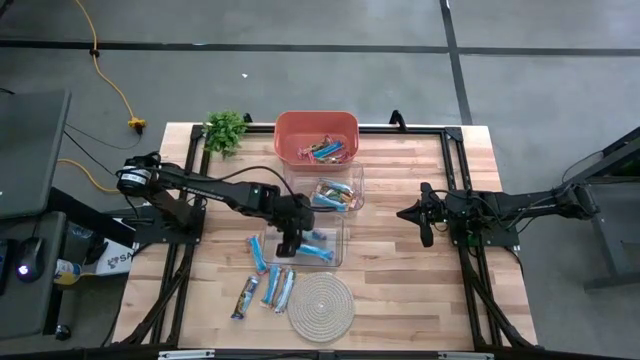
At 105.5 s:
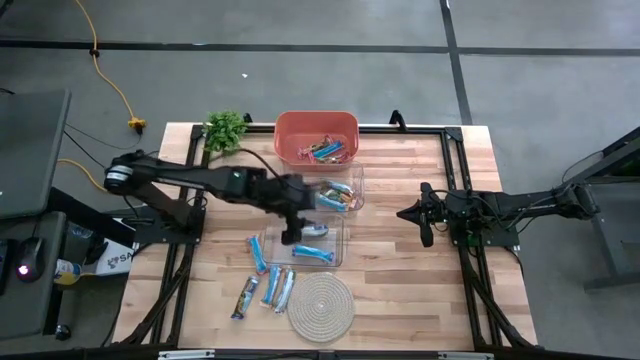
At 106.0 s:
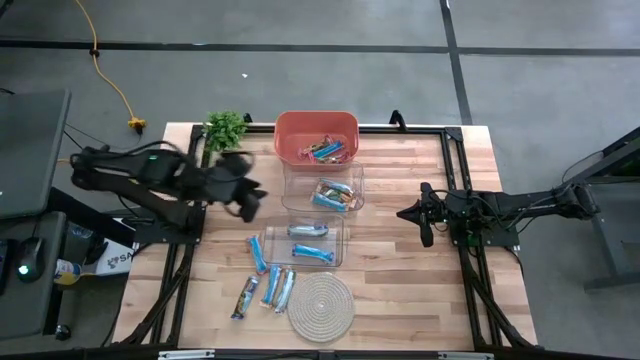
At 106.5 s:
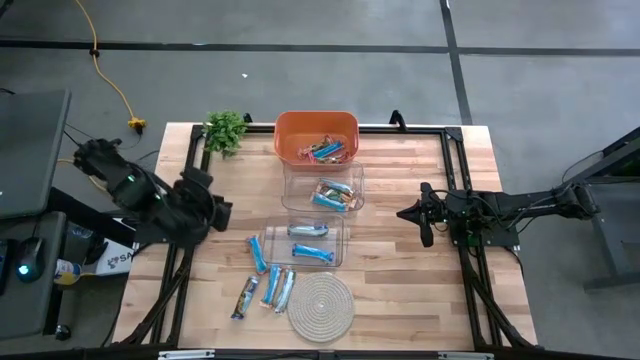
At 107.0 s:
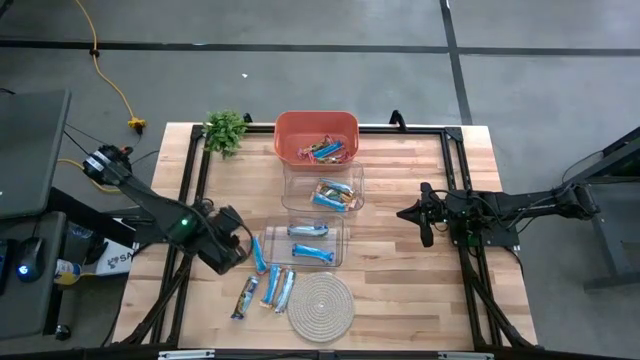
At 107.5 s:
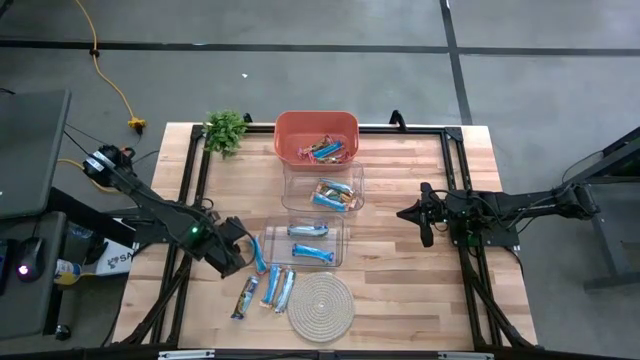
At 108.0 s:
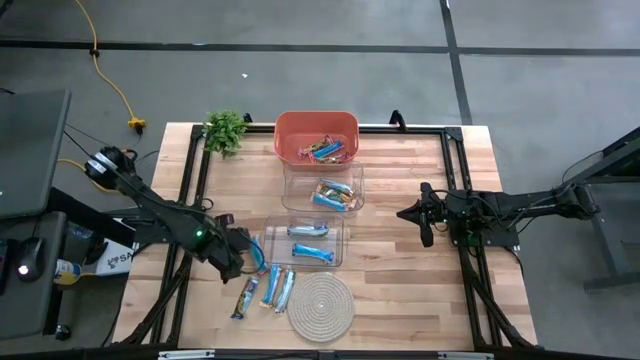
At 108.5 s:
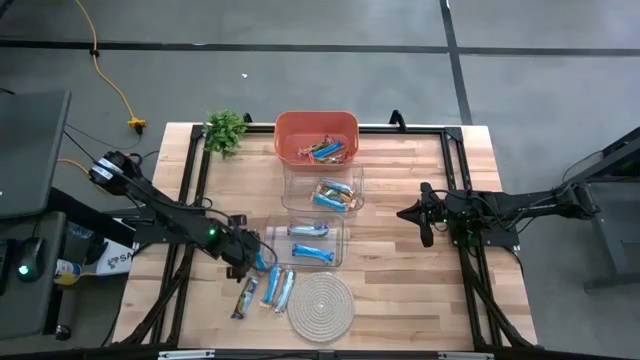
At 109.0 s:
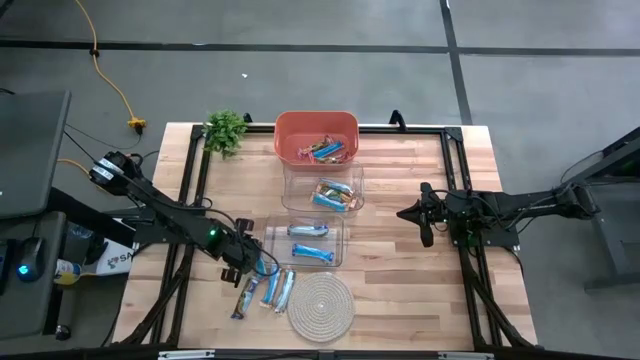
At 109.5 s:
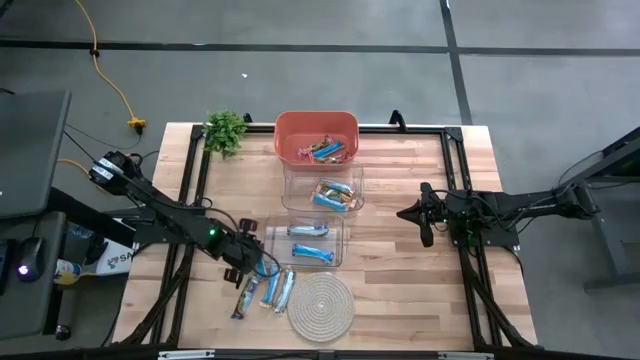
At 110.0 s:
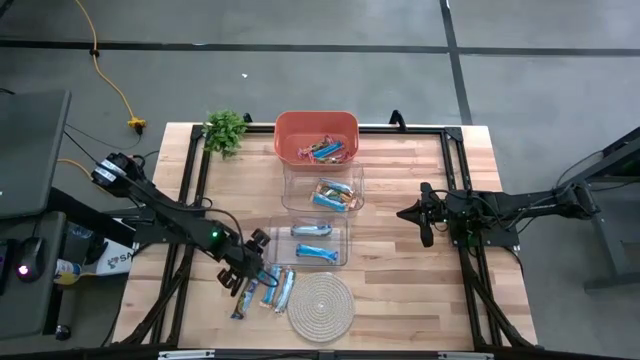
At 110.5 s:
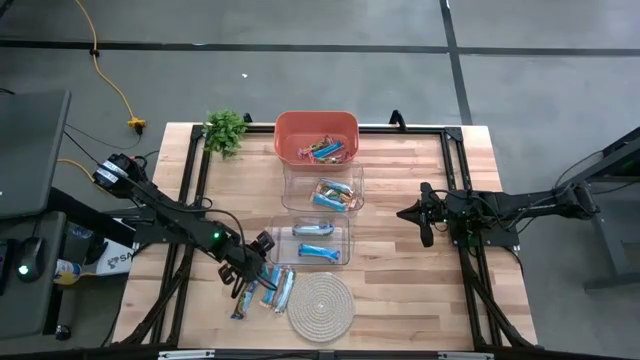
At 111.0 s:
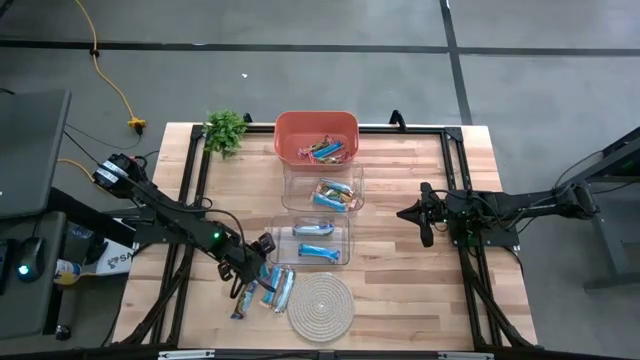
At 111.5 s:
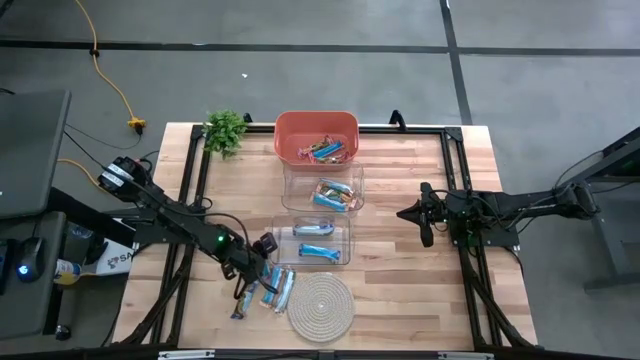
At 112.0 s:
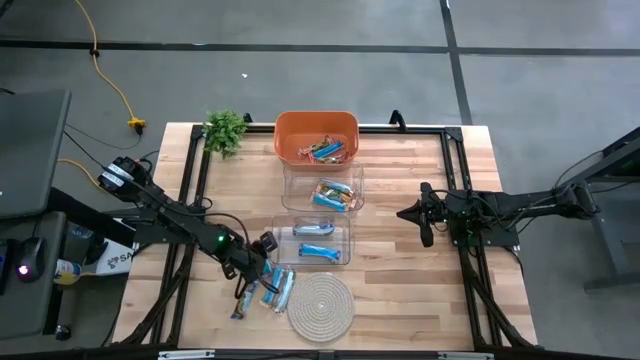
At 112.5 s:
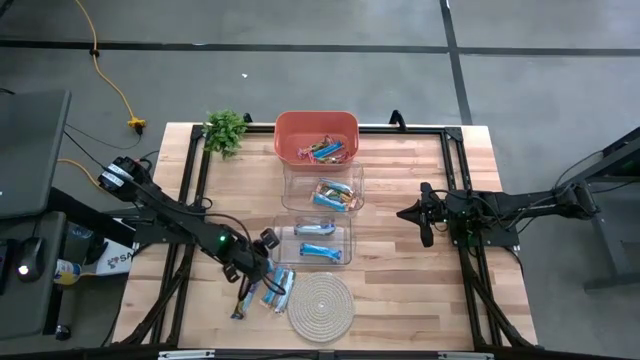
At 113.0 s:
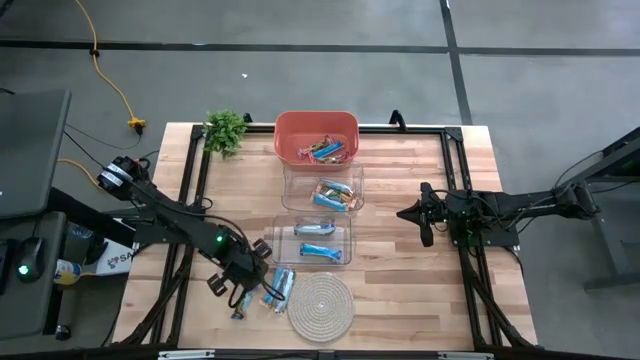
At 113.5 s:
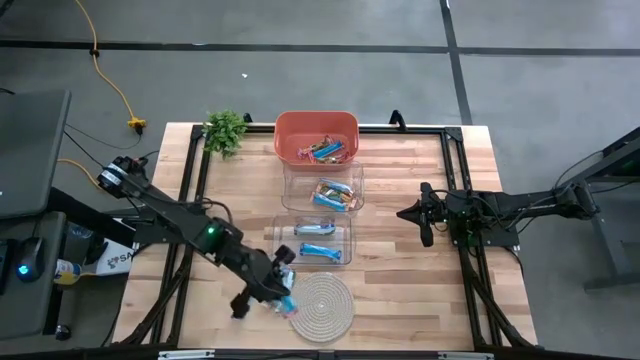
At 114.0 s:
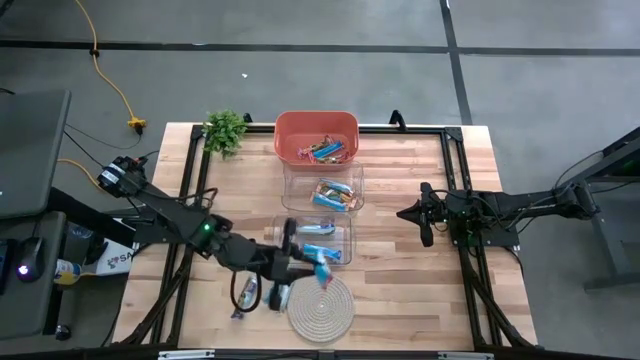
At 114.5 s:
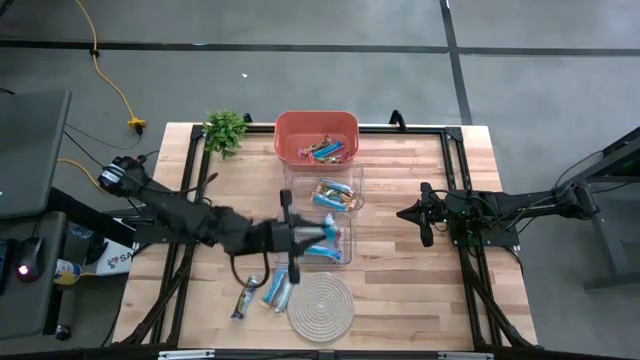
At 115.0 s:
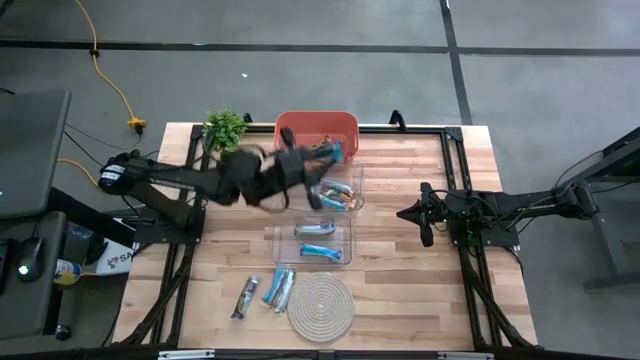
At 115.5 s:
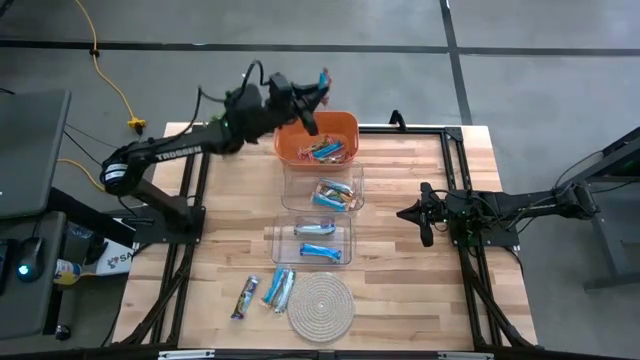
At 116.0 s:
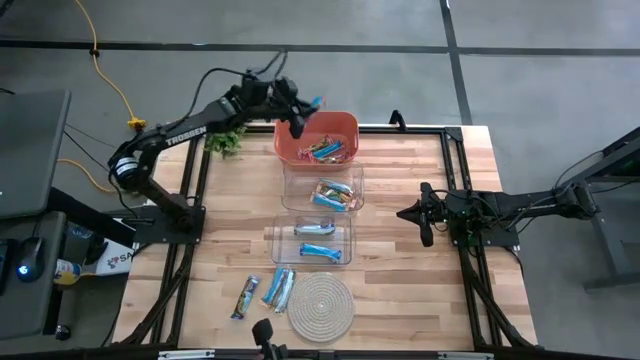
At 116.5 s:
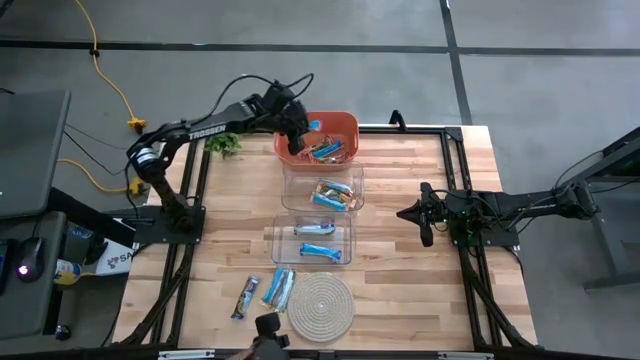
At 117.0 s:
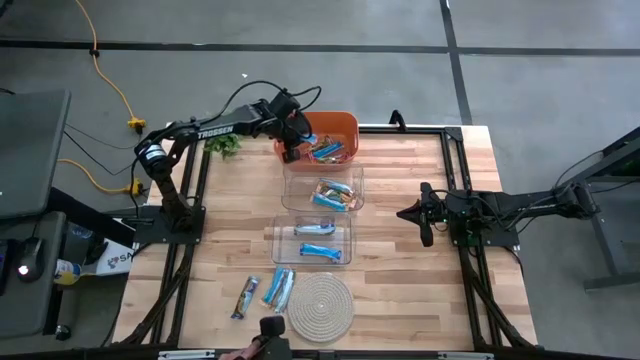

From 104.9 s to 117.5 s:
Task: Pick and place Granola Bars by type
Put the red granola bar into the orange bin

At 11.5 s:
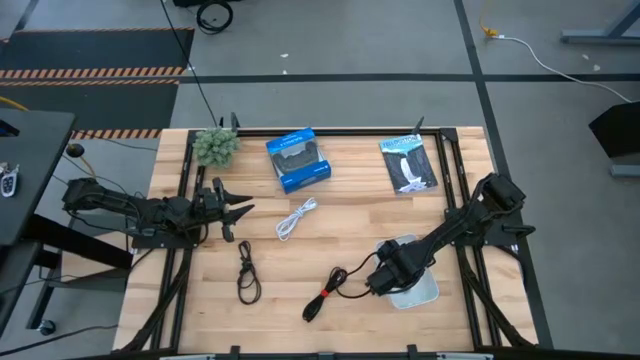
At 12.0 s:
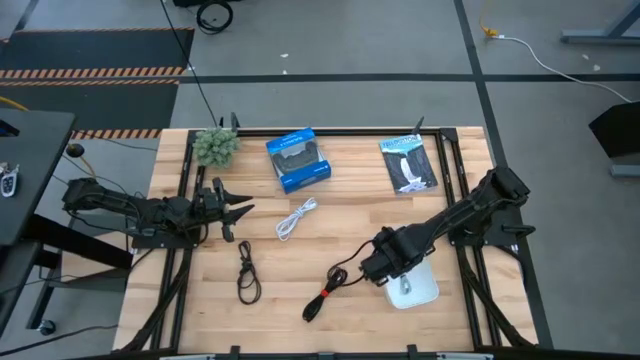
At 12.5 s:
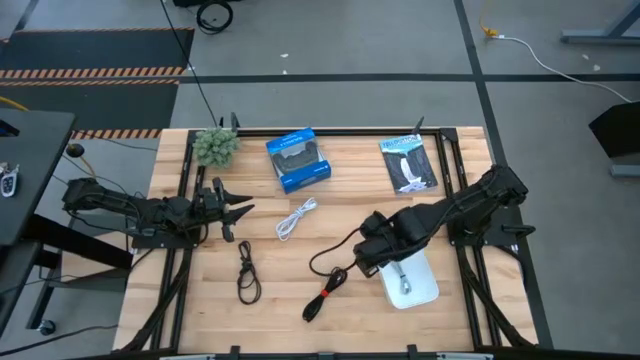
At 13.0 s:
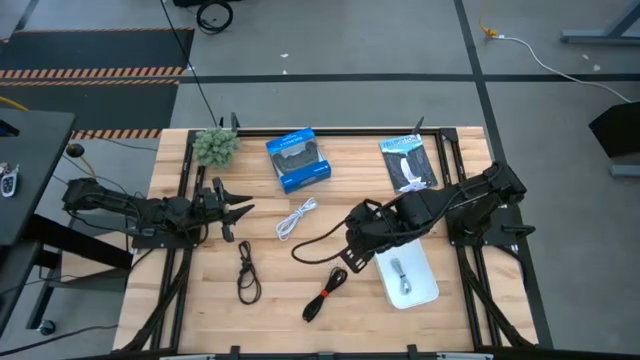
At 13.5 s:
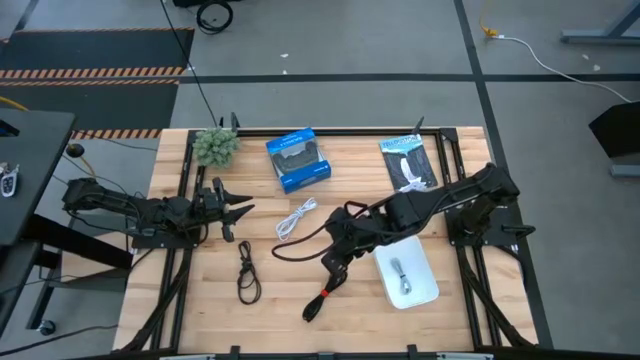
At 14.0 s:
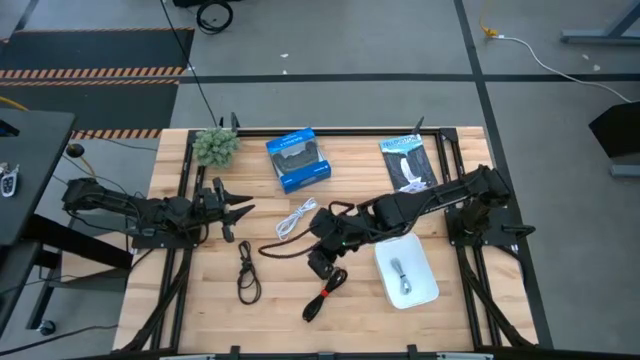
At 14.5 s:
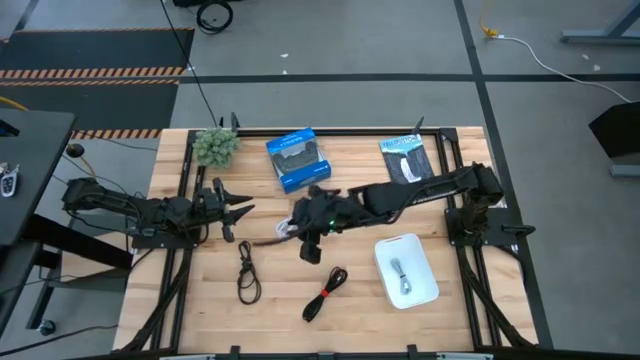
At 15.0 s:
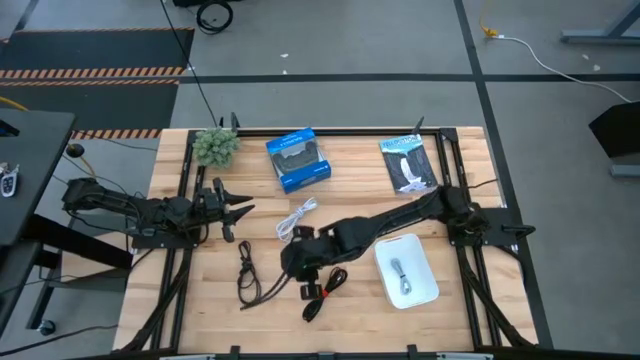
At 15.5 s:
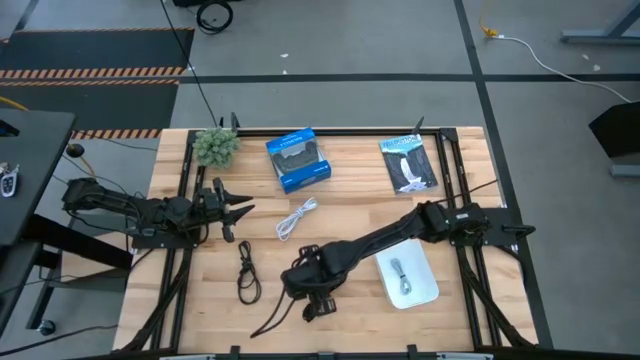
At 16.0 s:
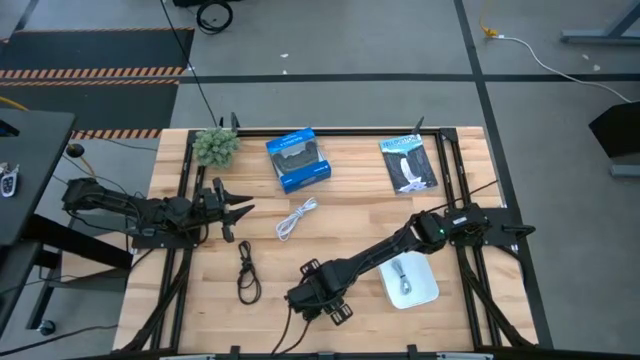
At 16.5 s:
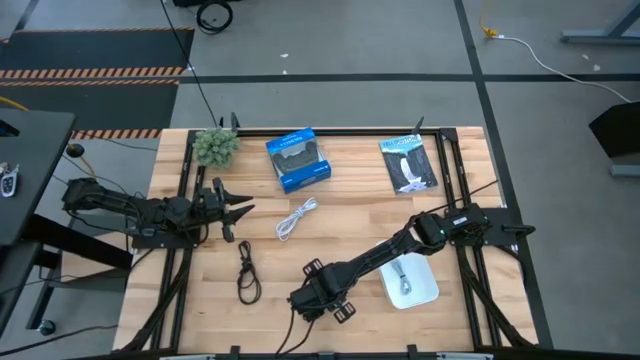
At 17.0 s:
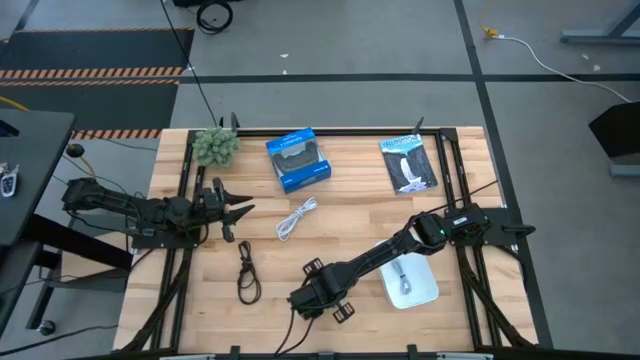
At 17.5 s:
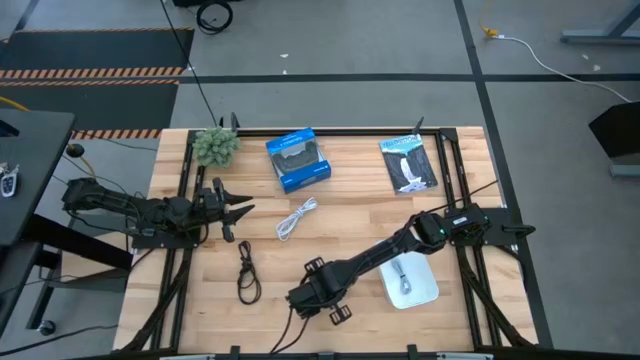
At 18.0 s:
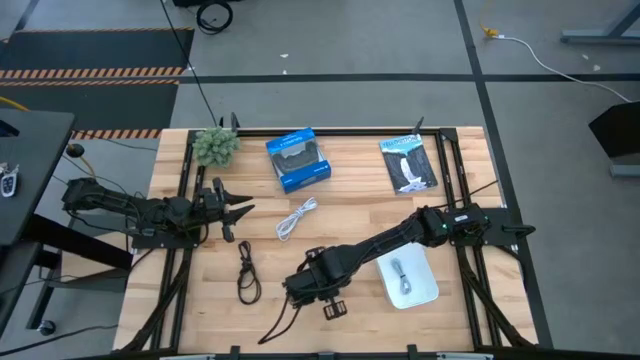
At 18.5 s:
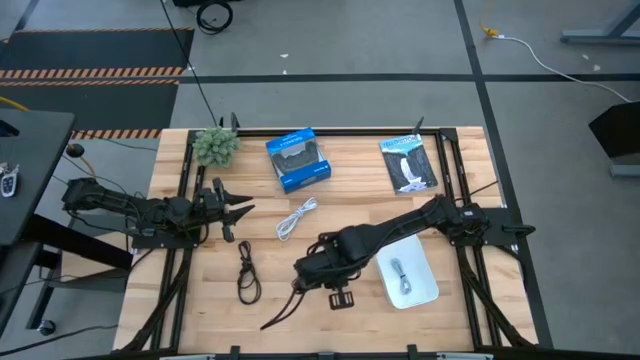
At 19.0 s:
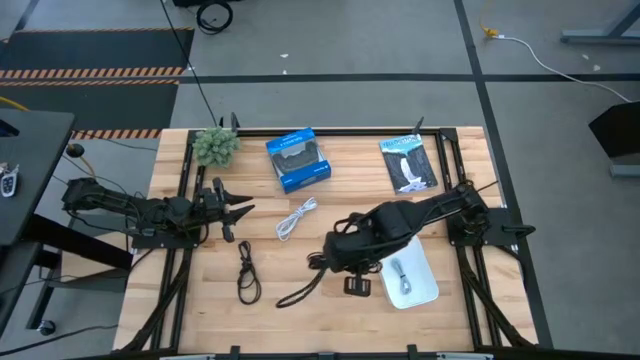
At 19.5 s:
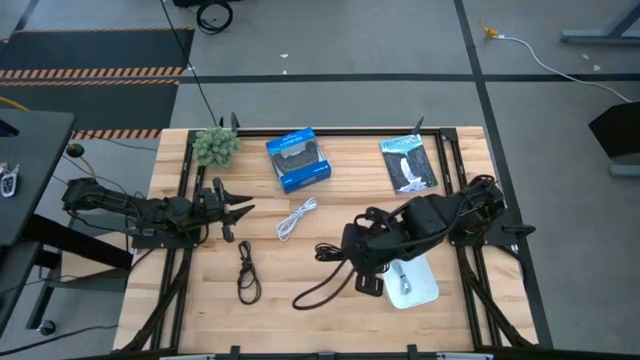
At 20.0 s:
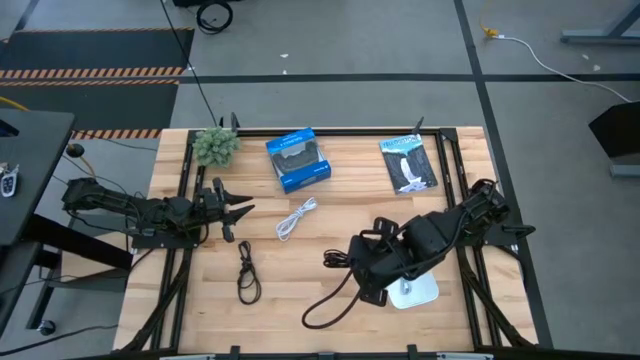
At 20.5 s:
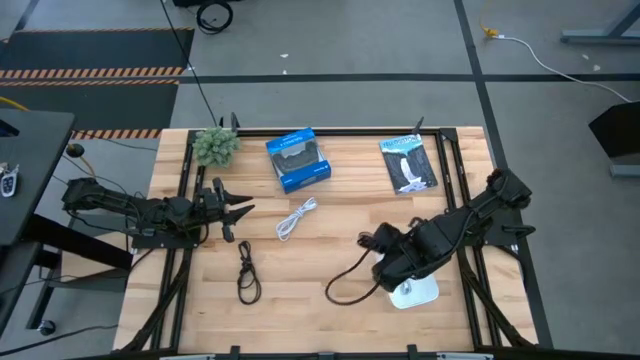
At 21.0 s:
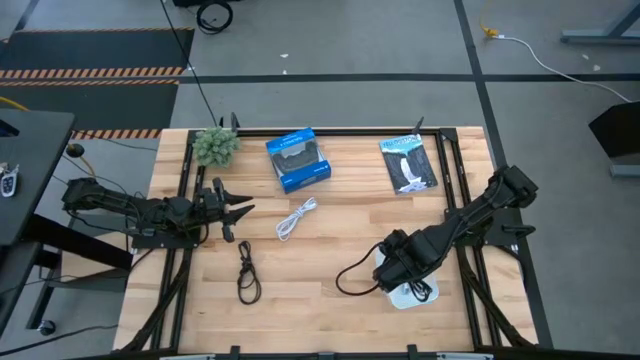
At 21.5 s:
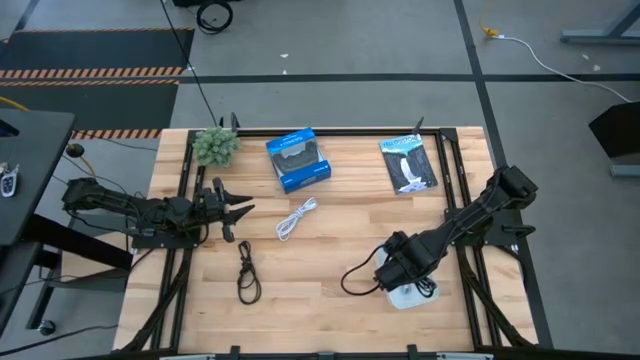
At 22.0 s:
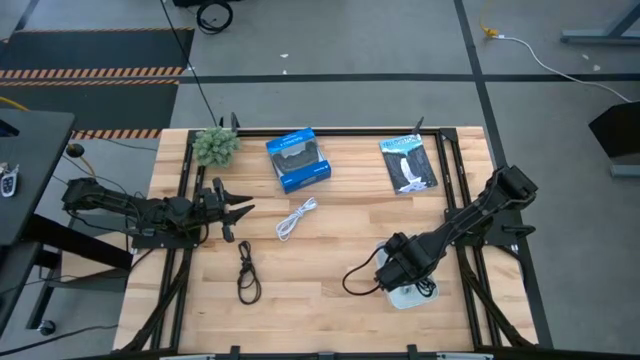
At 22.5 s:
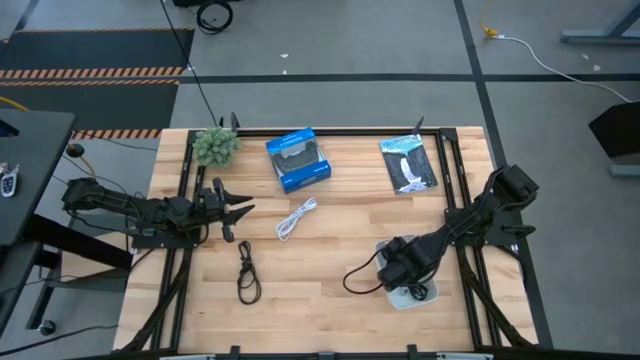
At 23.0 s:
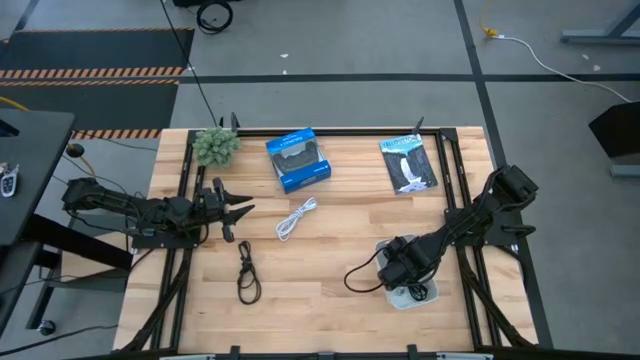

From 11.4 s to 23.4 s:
Task: Pick and place USB-C Cables
Put the right black charger cable into the white bin
